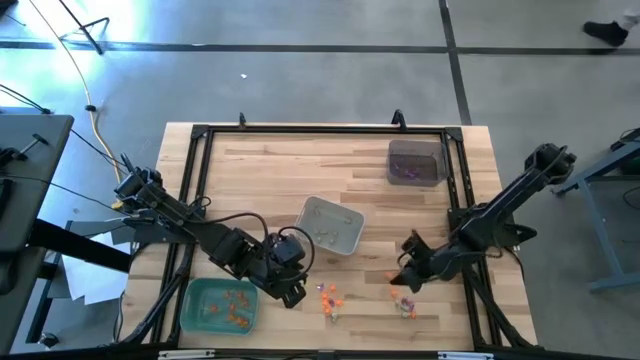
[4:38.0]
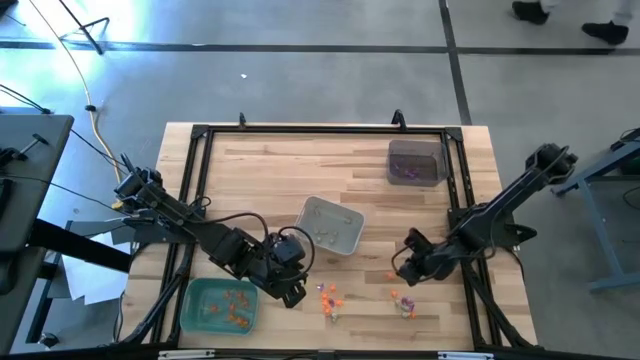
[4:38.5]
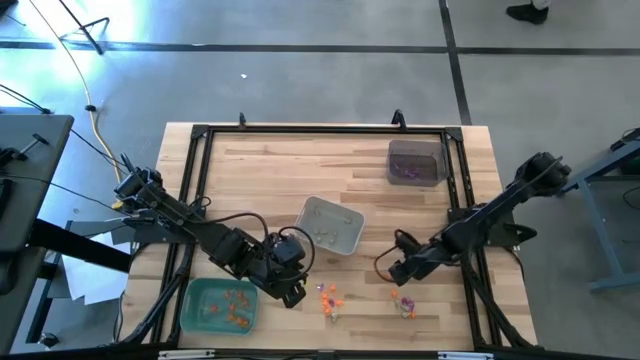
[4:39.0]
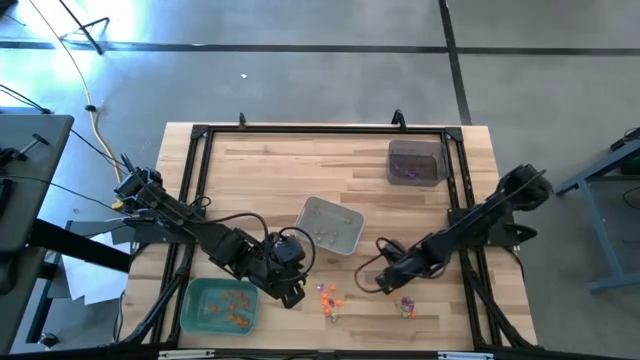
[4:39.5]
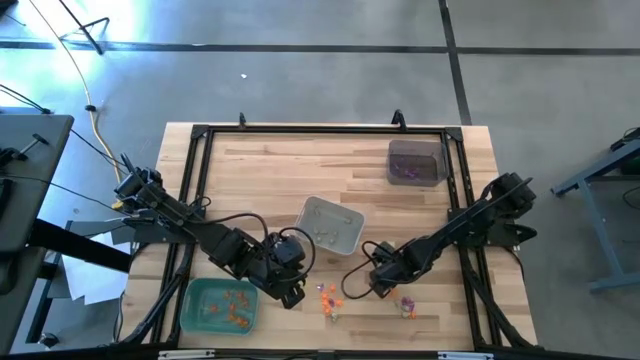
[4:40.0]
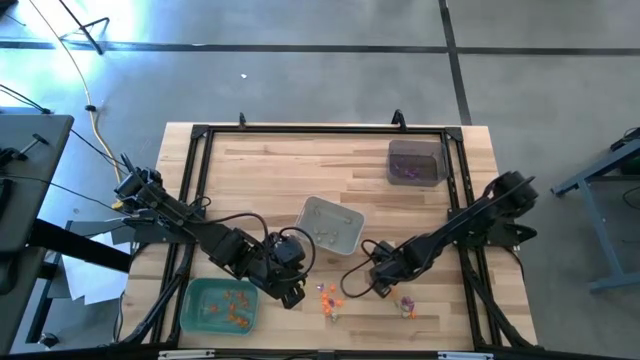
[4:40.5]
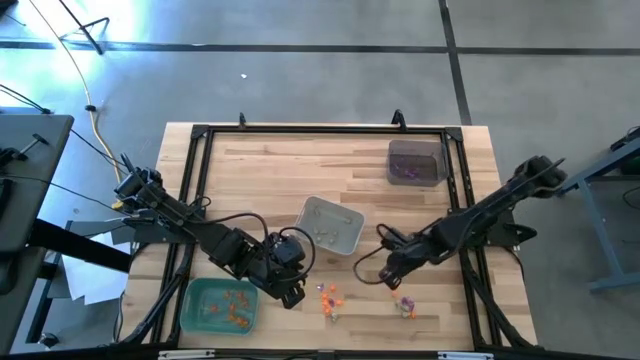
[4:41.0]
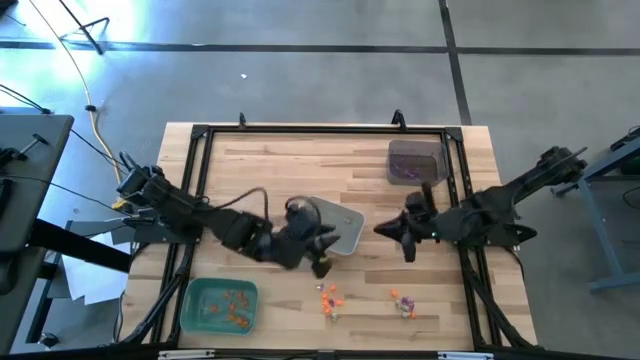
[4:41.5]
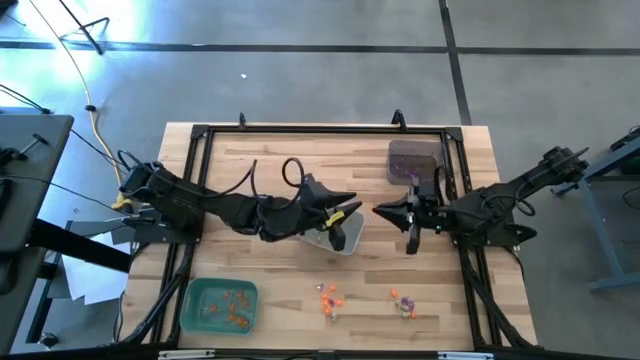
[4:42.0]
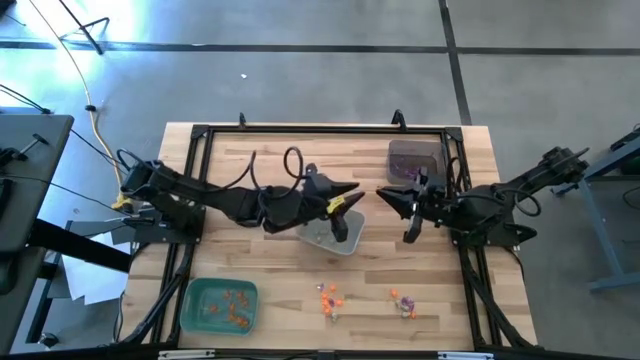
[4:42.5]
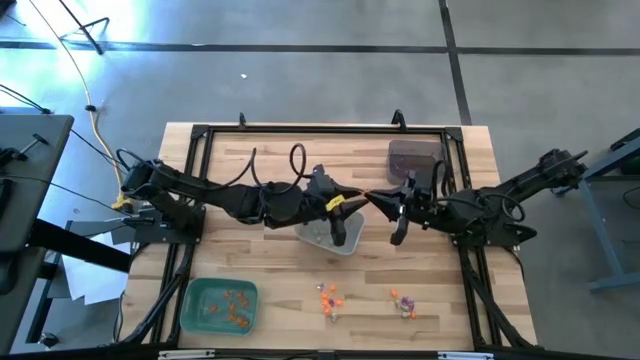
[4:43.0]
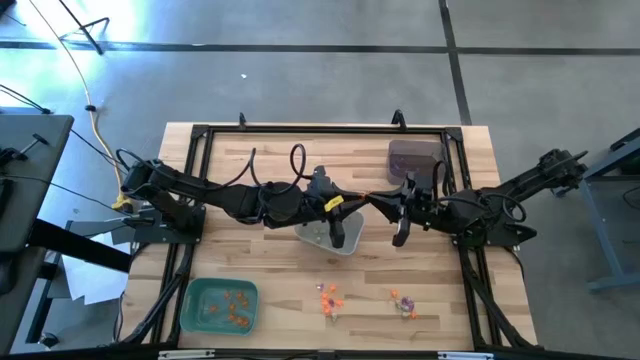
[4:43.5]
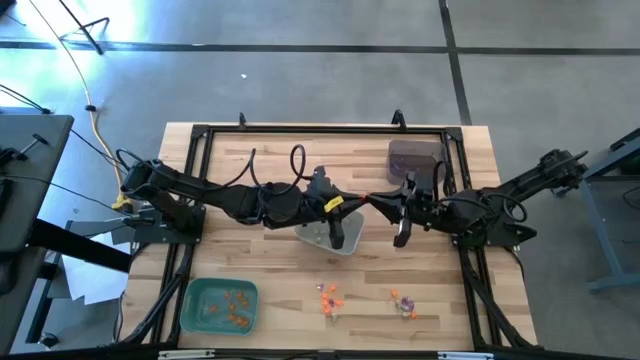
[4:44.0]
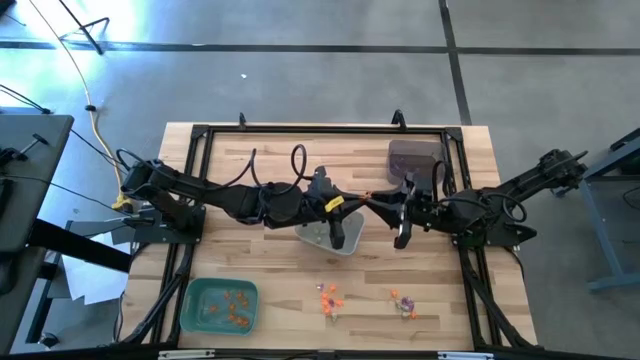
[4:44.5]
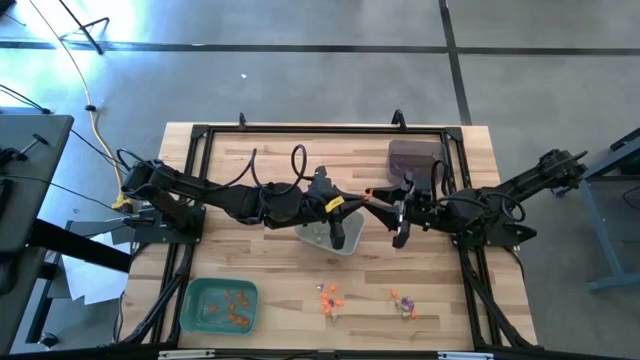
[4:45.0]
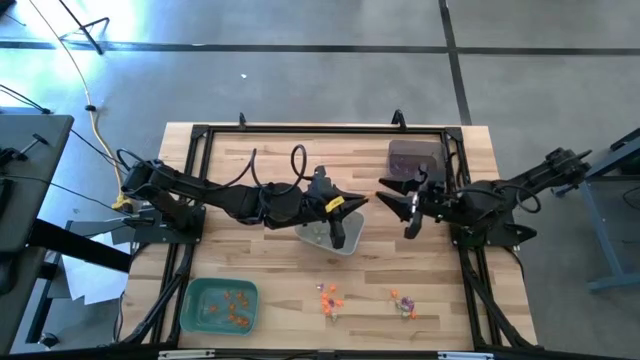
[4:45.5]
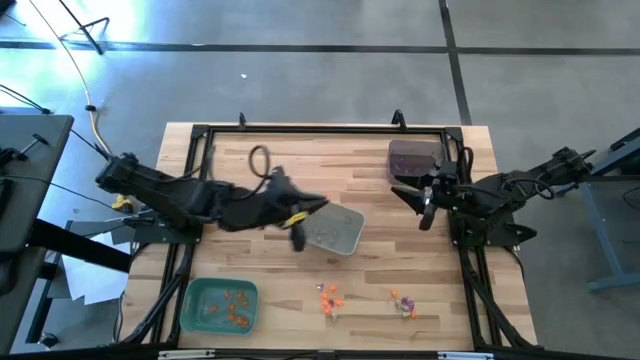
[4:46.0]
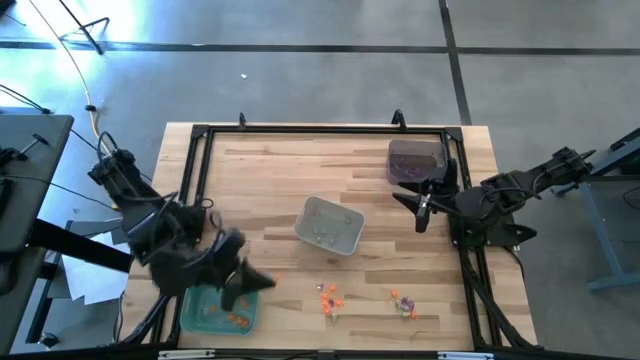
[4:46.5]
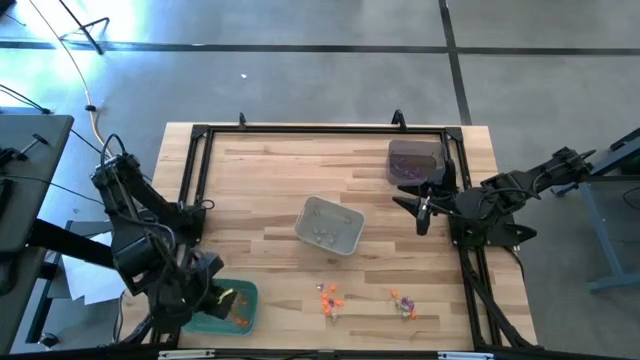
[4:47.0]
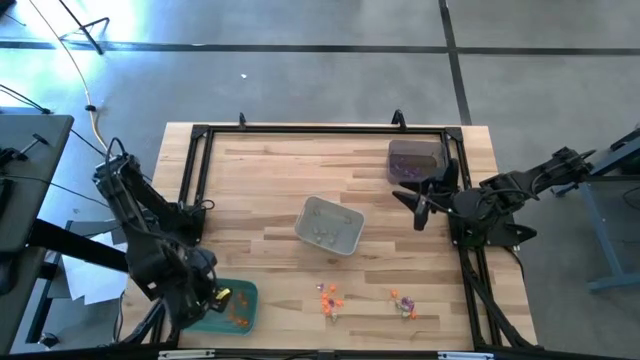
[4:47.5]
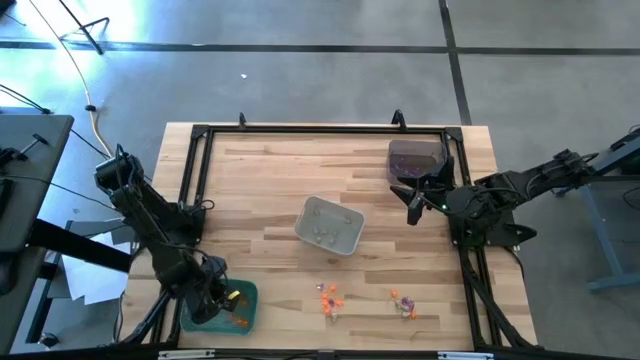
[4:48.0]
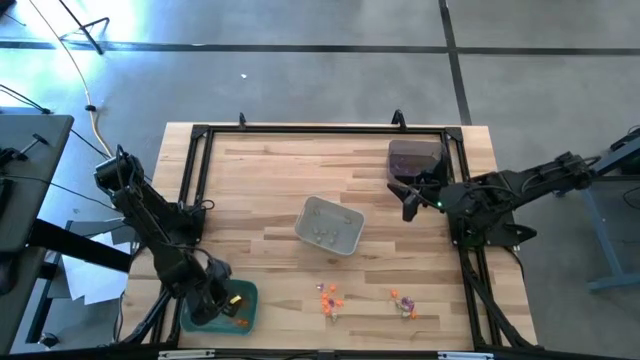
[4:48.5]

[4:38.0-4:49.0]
Task: Sort Halloween decoration
Put the orange spider toy into the green bin

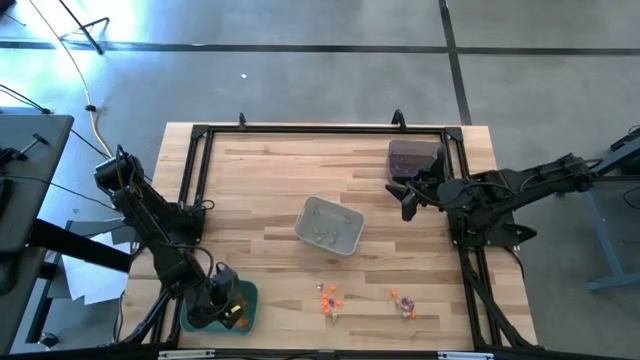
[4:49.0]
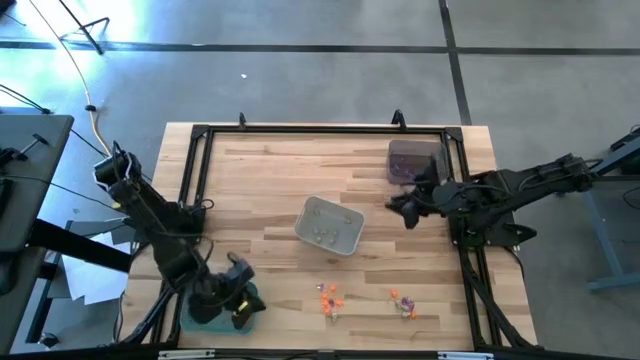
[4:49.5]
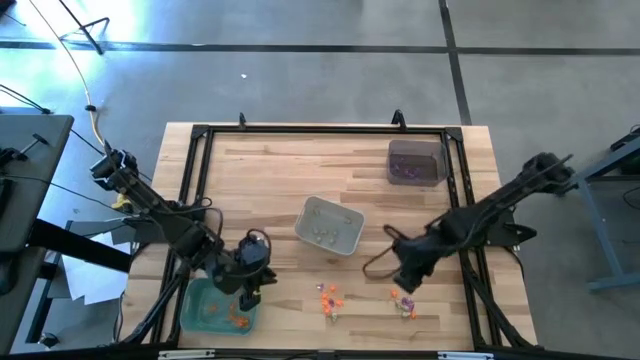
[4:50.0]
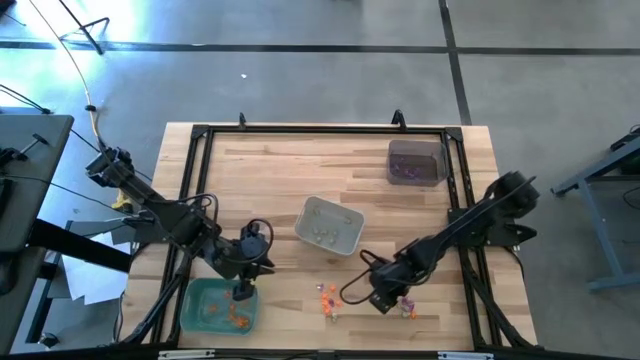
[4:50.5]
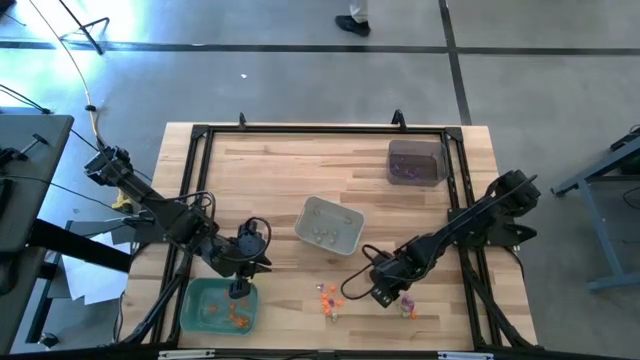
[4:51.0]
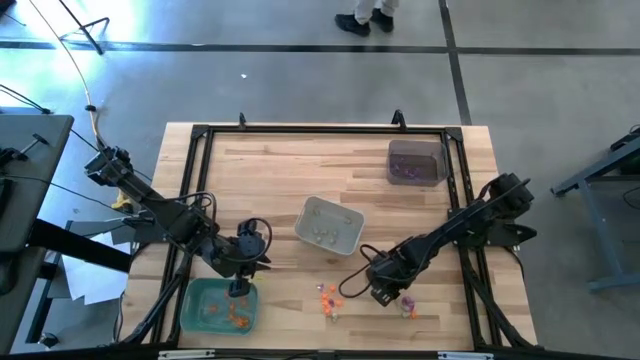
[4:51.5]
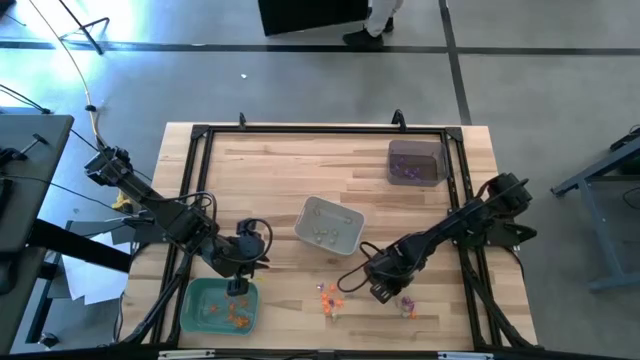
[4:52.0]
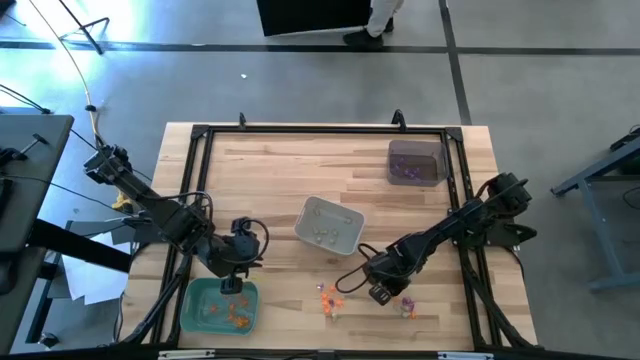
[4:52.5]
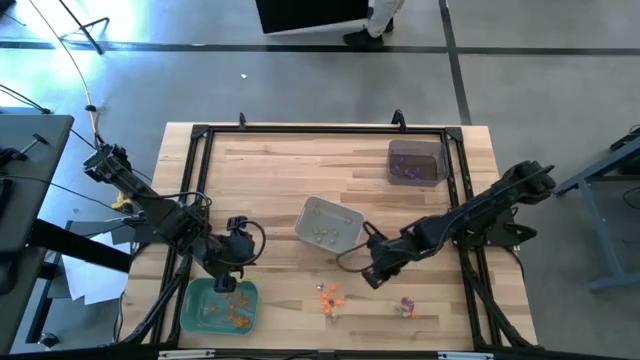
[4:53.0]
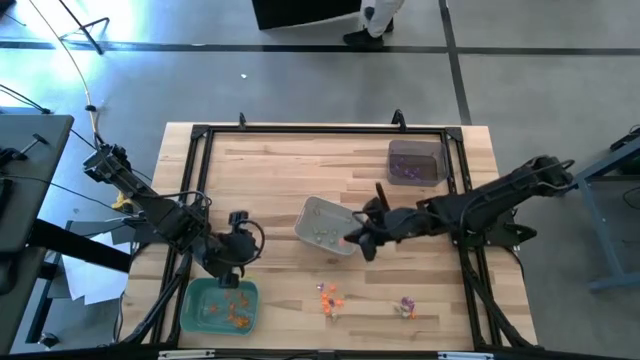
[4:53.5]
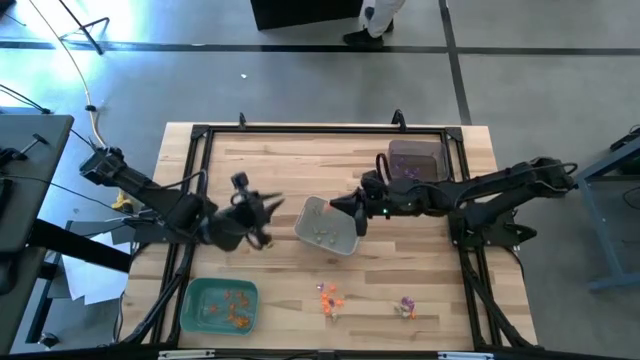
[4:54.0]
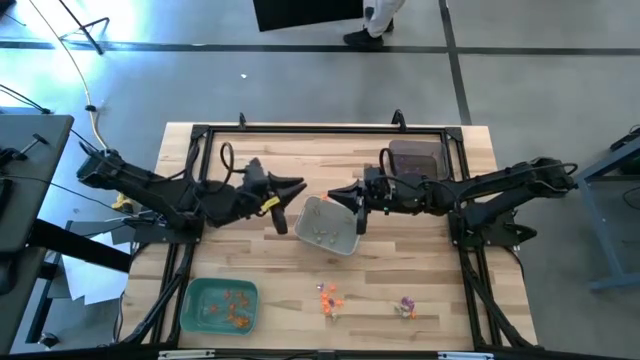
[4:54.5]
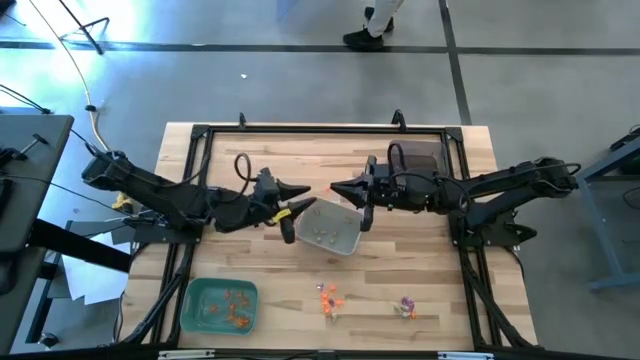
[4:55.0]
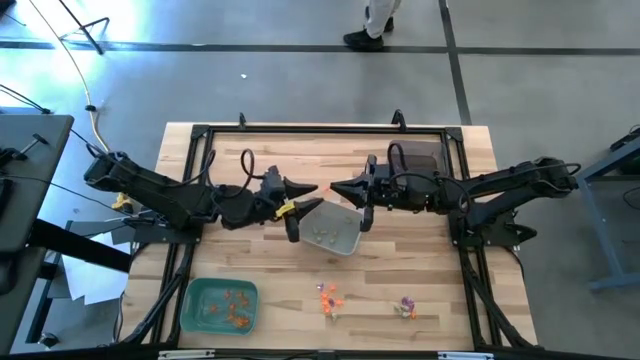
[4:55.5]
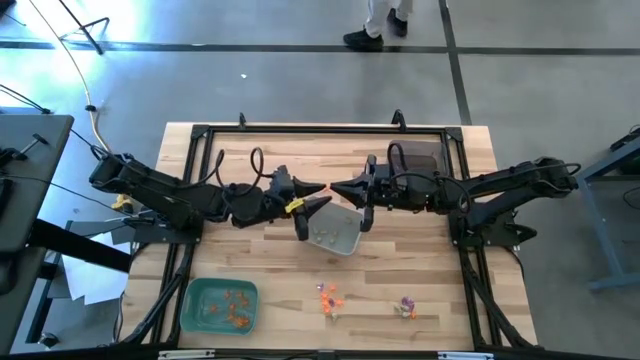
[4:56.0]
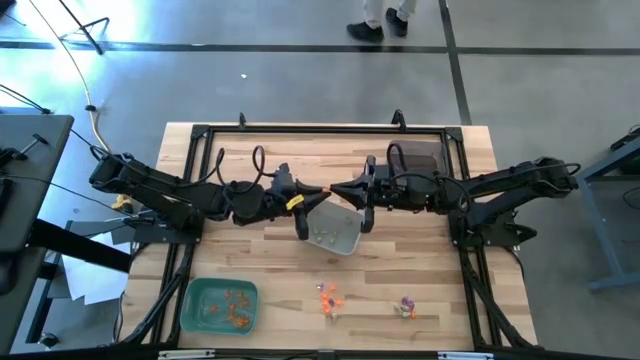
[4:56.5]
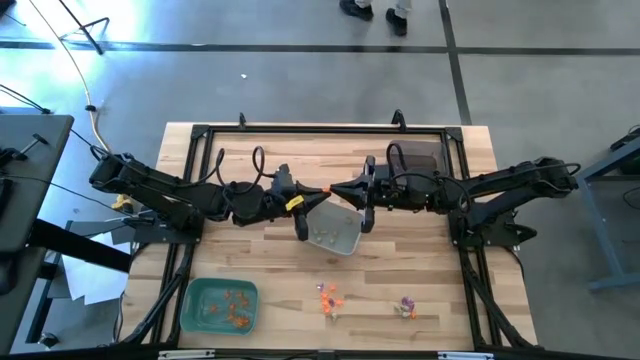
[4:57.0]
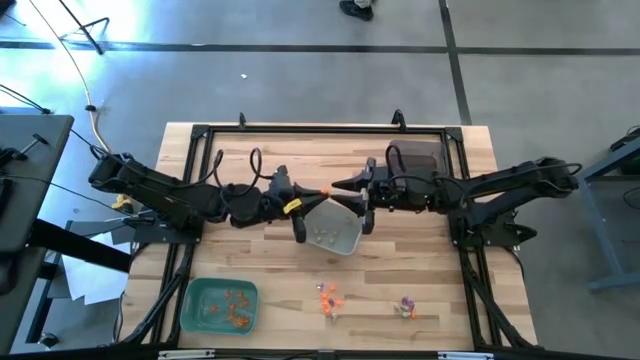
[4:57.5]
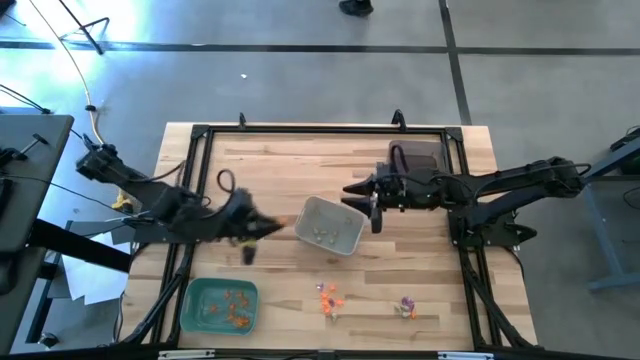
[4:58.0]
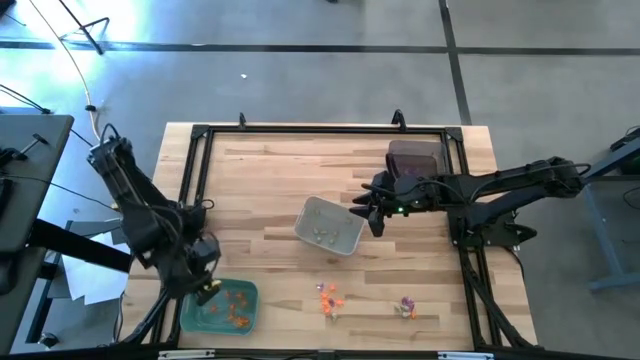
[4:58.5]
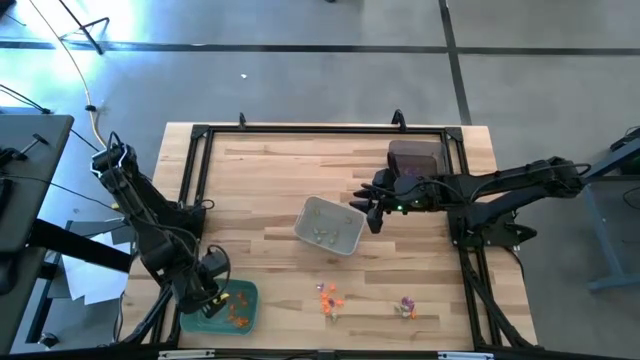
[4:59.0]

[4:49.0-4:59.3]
Put the orange spider toy into the green bin
